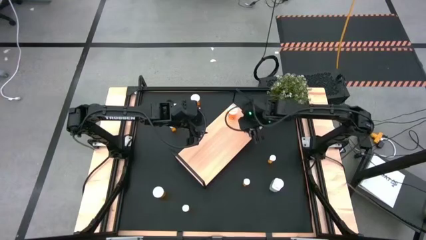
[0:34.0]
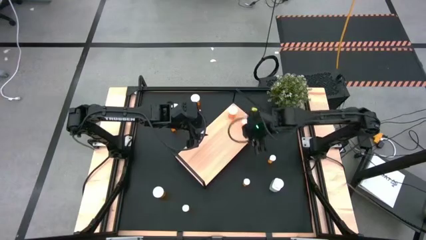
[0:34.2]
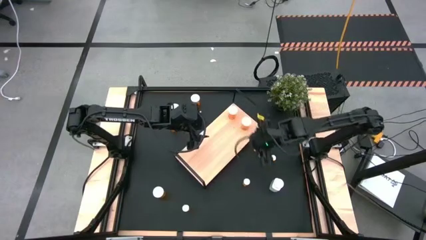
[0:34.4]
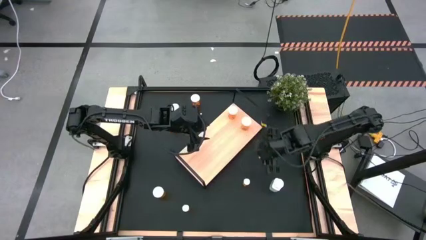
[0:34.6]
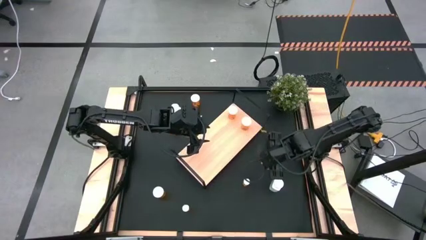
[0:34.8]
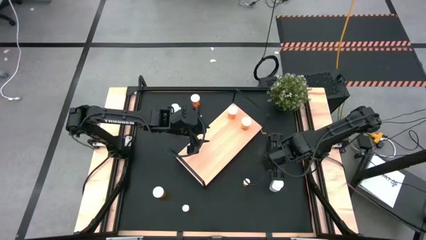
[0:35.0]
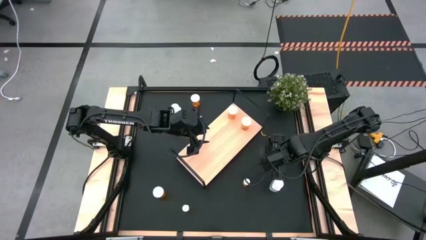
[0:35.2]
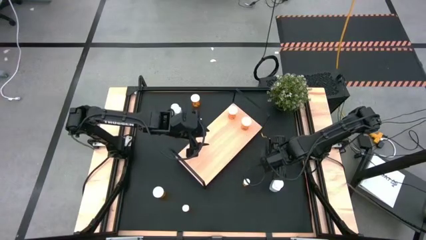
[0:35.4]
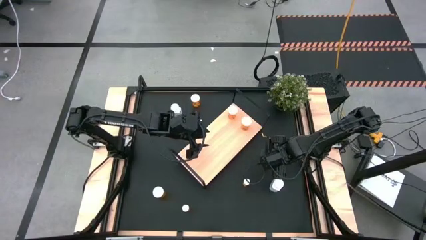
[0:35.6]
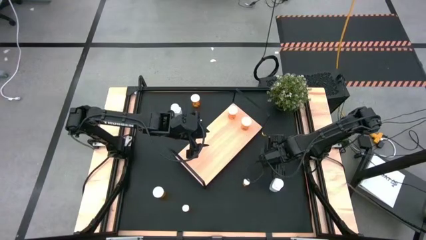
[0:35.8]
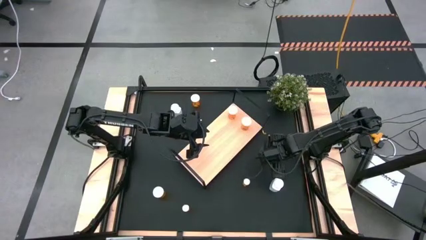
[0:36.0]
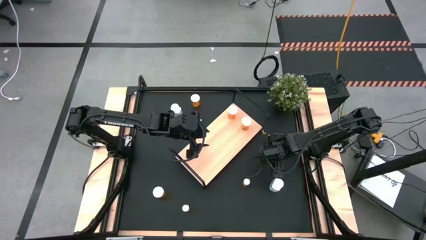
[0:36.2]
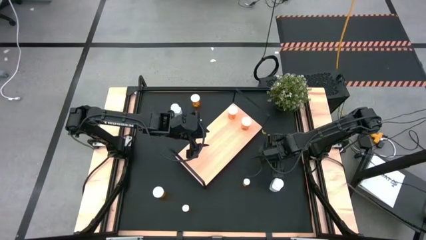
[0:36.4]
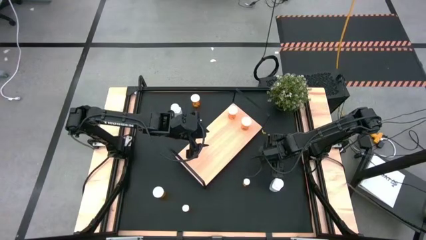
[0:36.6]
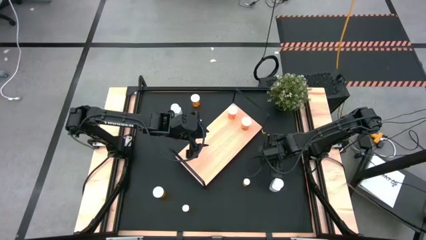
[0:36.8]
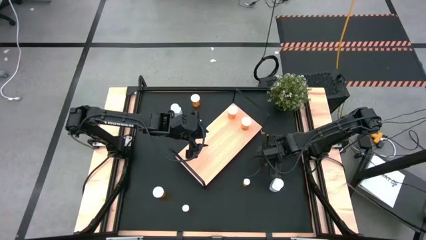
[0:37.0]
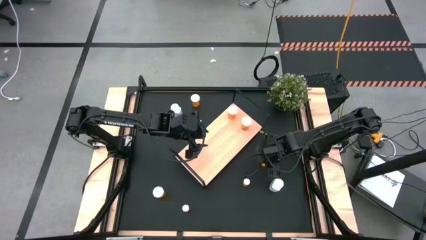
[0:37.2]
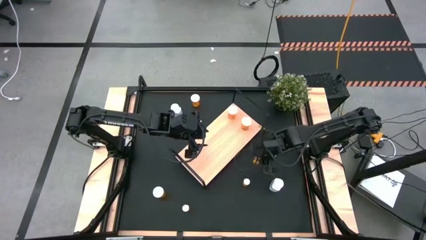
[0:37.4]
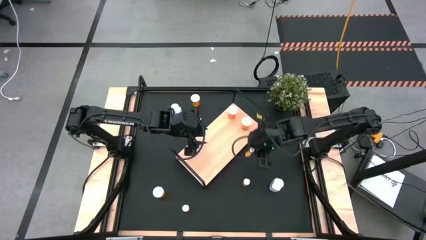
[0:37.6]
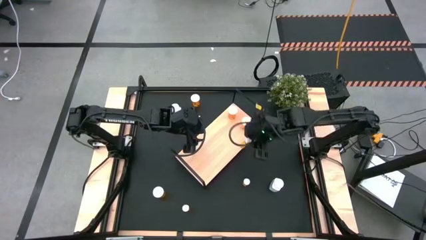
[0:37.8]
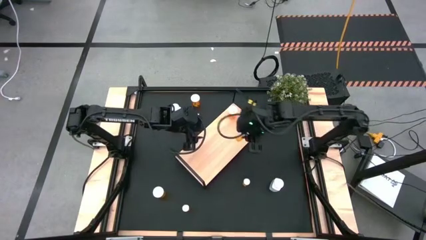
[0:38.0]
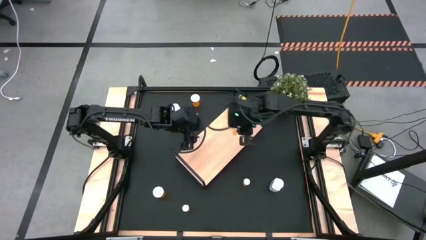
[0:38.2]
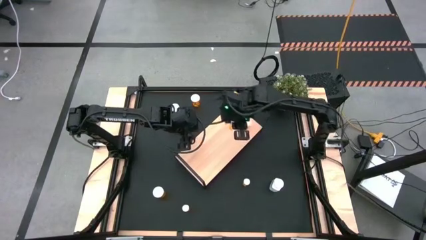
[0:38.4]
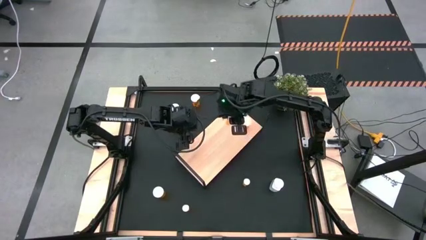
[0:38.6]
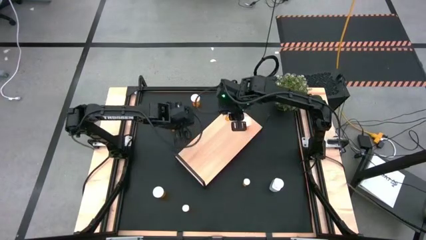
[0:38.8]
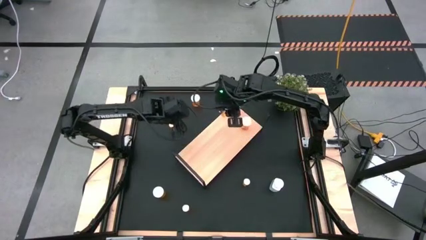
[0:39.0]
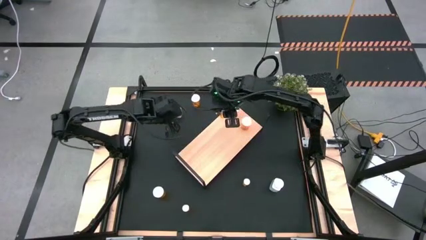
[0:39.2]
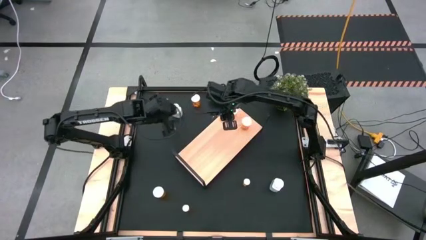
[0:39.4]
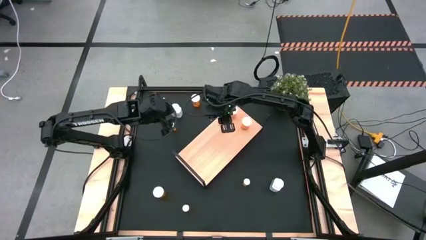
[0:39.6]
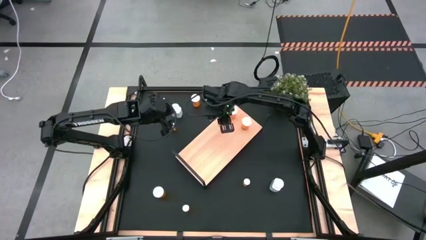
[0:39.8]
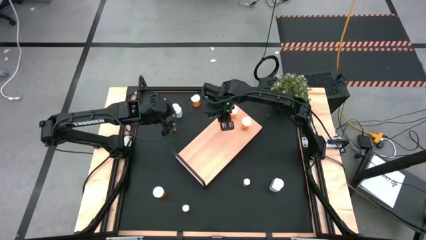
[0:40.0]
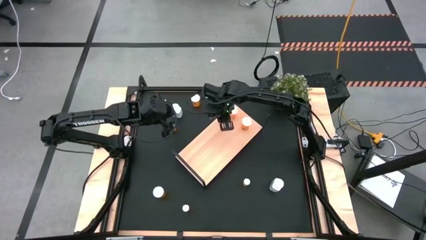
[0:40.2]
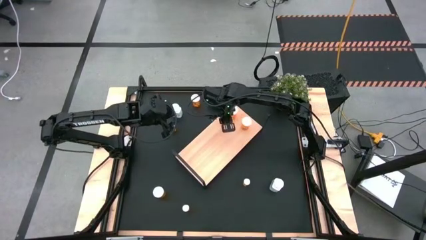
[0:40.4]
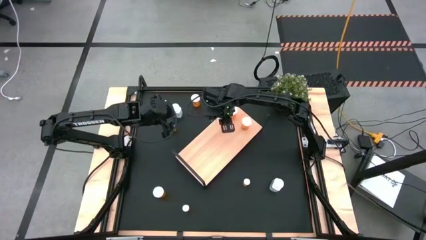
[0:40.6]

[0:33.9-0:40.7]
Task: Pick and place medicine bottles onto shelf by color
Put the small orange pill bottle on the shelf

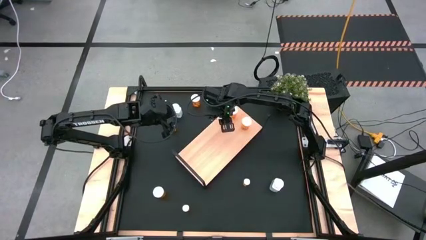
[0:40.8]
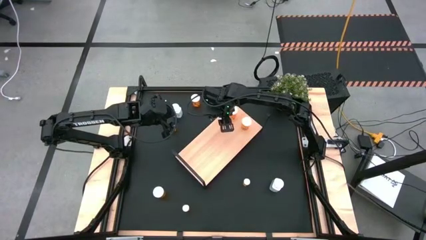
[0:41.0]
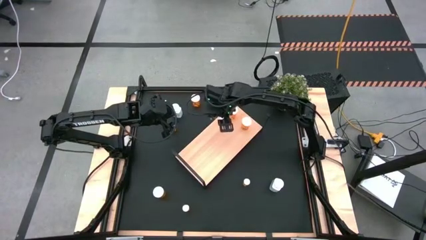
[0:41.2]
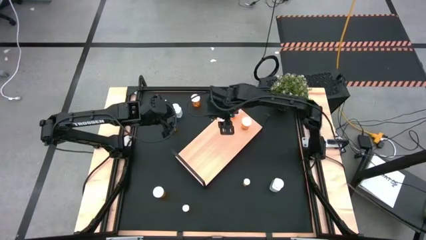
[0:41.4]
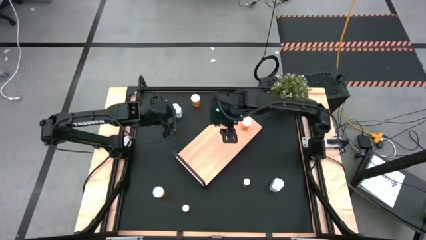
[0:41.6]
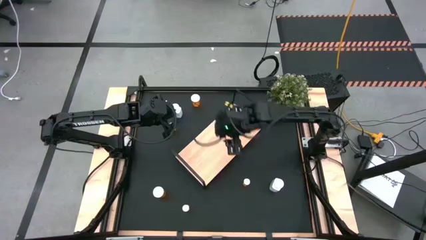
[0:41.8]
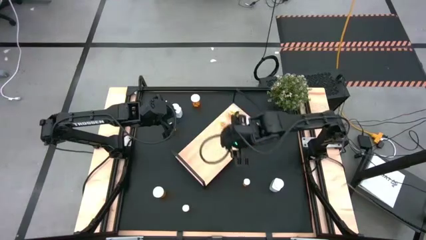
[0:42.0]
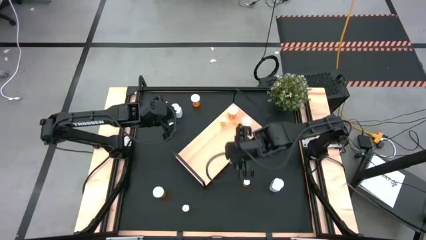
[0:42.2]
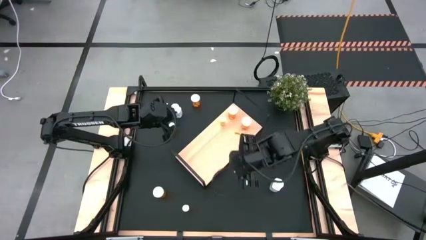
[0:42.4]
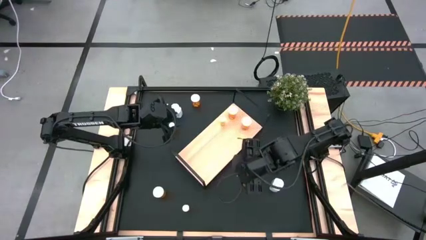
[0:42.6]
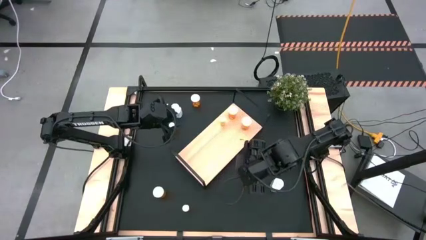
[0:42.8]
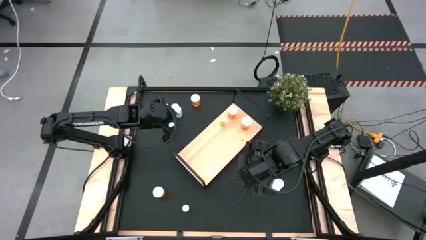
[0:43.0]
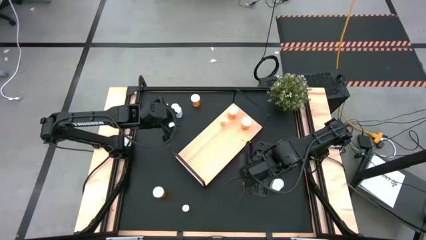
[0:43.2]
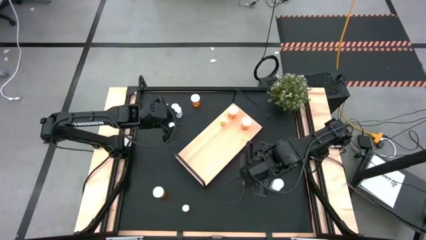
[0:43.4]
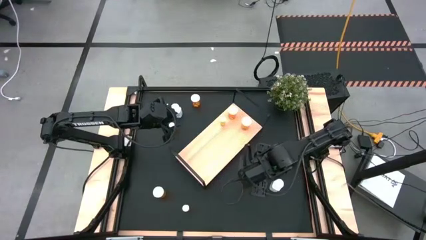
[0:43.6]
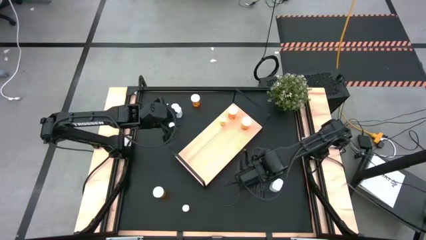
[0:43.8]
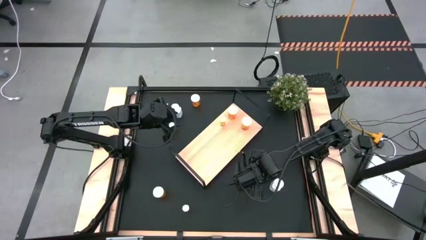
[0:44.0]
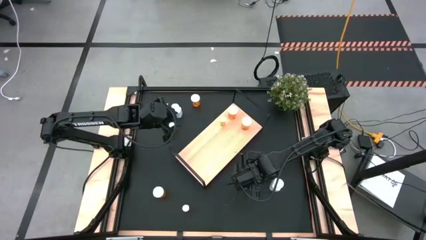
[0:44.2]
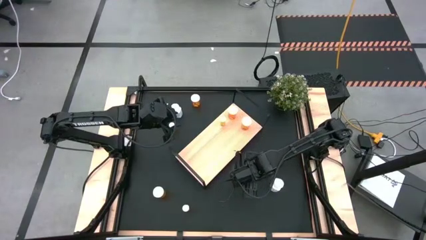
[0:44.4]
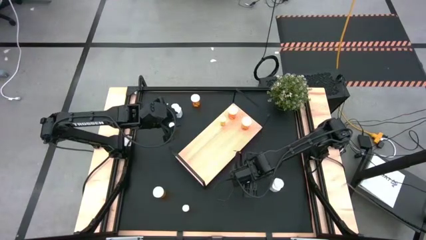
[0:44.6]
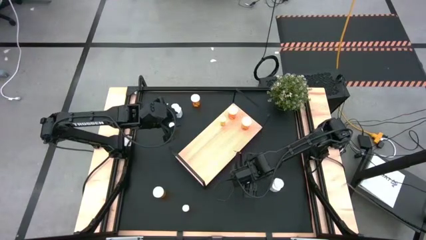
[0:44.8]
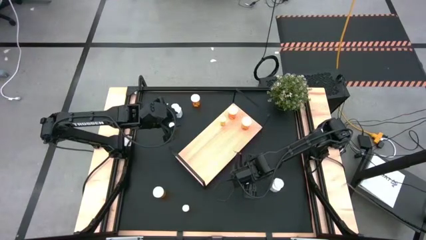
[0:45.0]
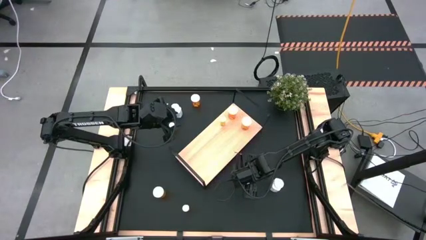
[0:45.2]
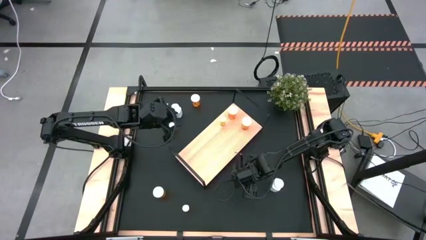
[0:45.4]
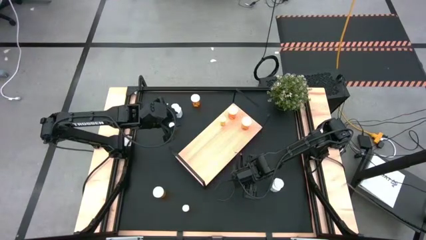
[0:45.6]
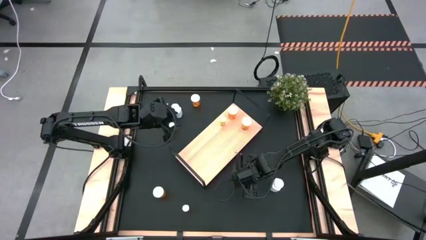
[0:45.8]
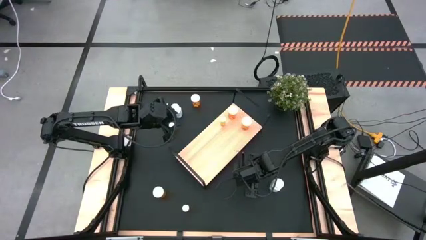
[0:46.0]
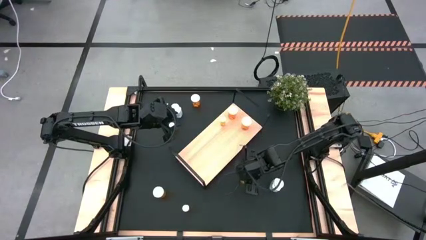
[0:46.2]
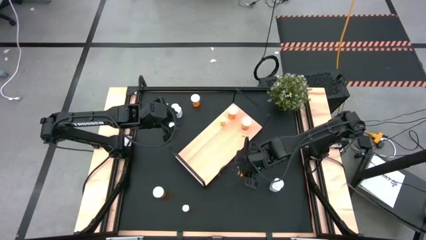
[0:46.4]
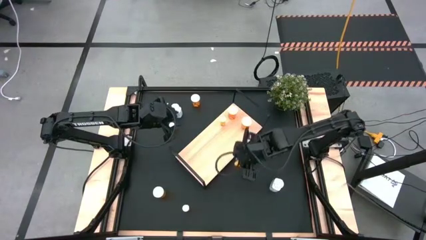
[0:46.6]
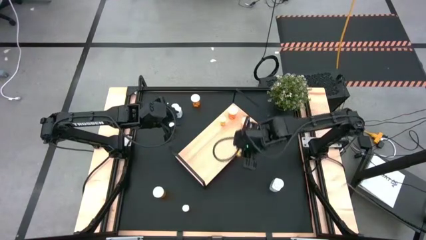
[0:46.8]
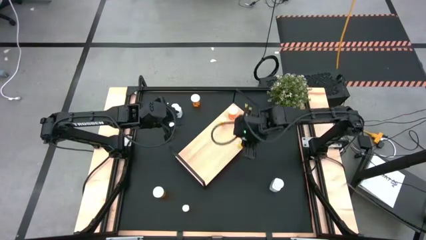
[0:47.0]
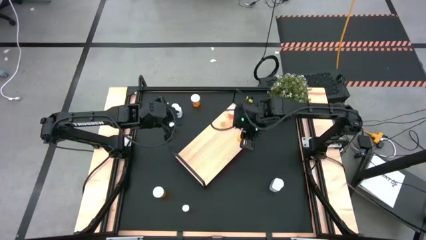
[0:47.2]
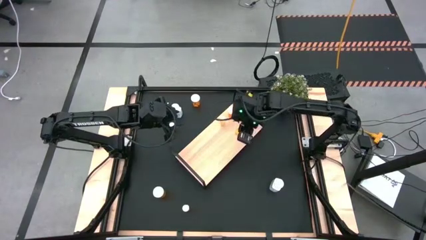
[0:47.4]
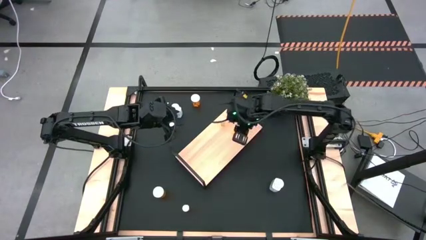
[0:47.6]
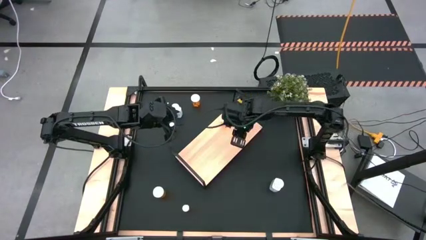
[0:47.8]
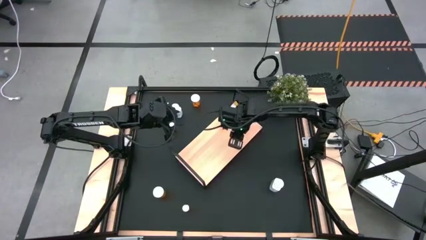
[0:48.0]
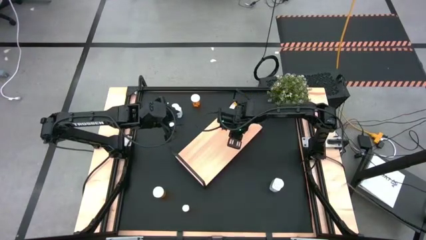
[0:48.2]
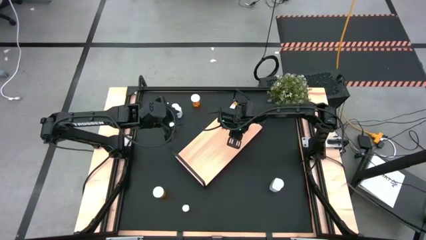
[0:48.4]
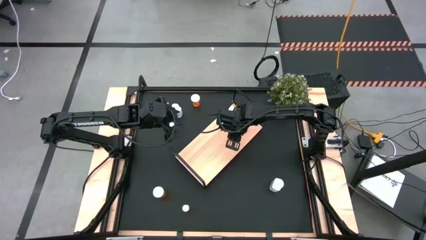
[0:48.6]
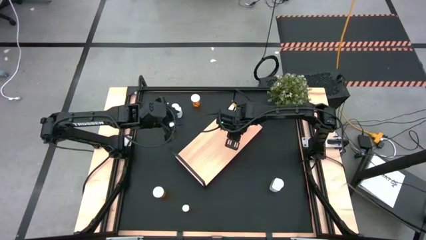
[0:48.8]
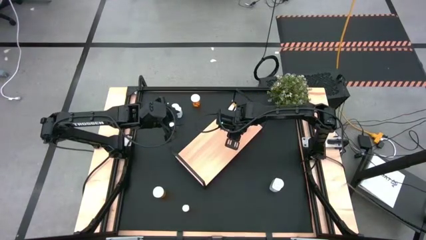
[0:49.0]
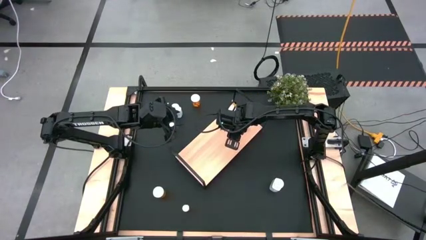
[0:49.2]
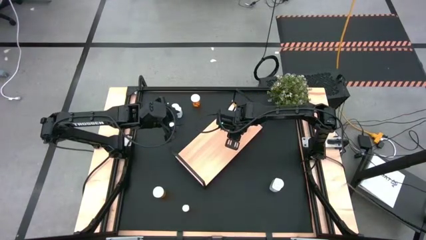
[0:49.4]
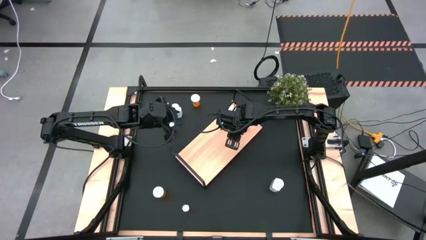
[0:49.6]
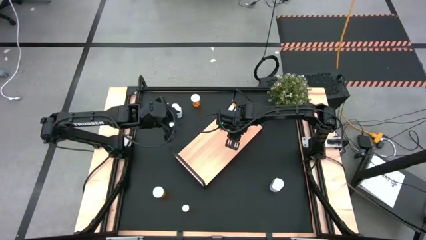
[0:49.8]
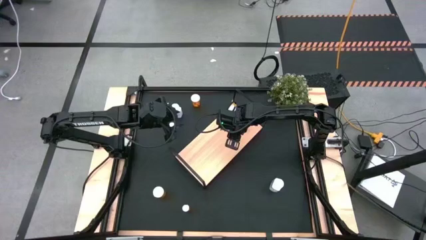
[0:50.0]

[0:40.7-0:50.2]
Align the small orange pill bottle with the other small pill bottle on the shelf

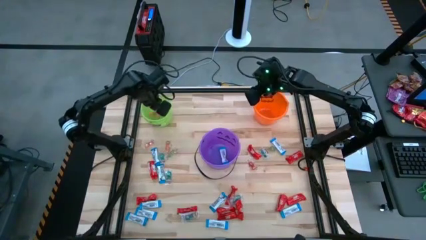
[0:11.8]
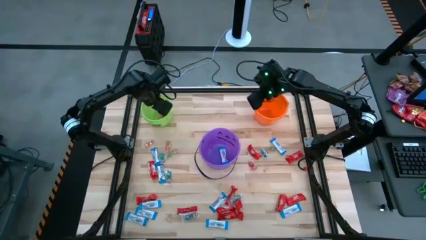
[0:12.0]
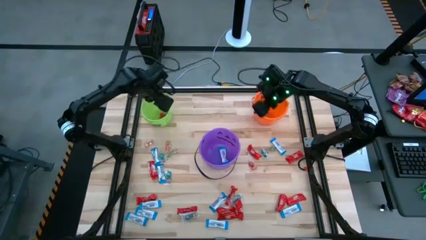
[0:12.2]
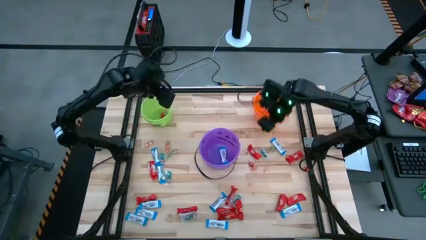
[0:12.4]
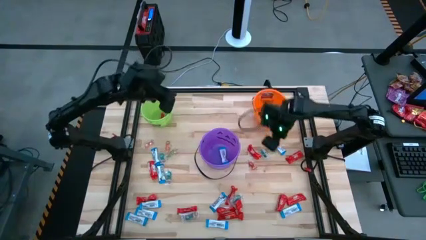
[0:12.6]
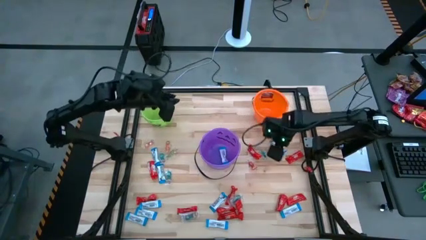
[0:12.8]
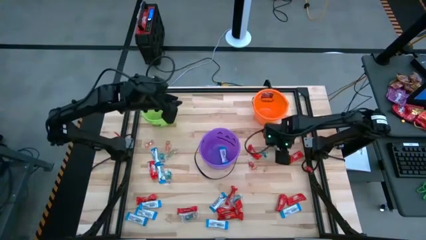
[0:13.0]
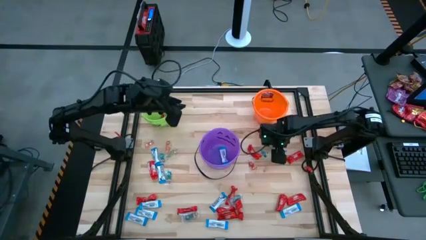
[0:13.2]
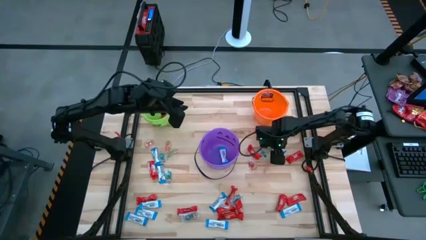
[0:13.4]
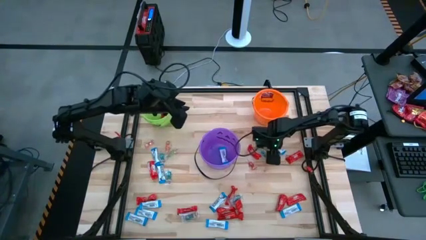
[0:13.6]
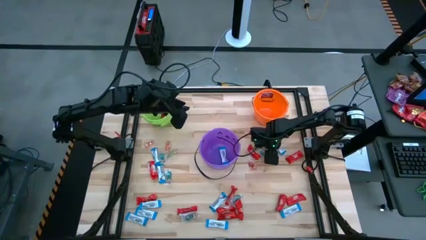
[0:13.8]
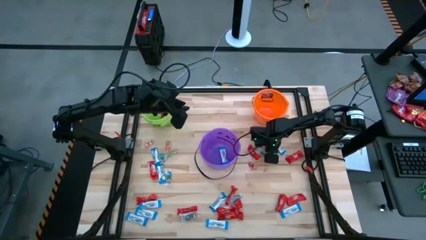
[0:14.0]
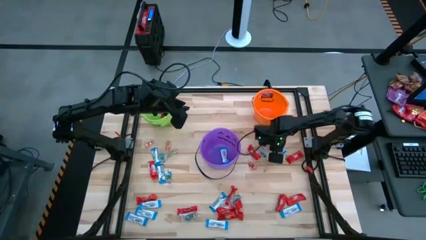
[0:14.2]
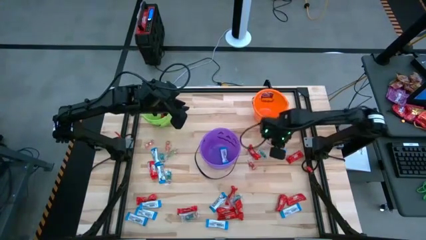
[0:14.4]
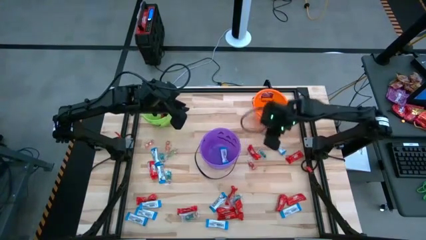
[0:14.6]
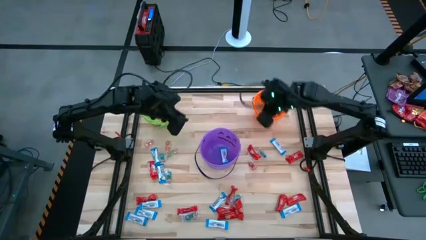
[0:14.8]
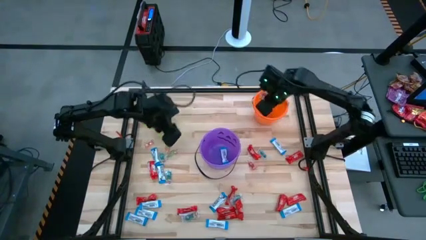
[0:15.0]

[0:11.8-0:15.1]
Task: Sort candy by brand, put in halloween buckets
Put the green gummy into the orange bucket
